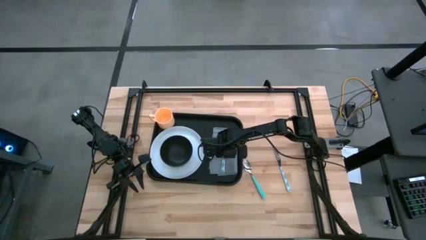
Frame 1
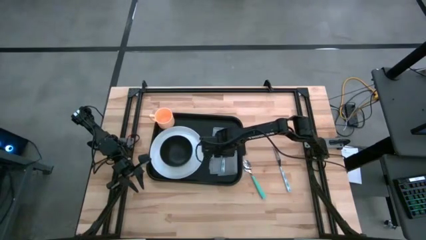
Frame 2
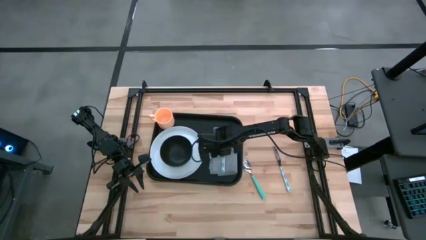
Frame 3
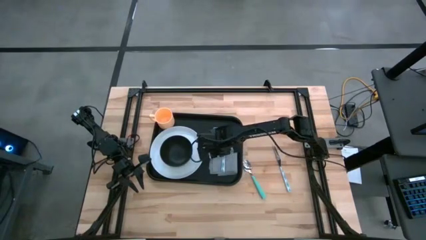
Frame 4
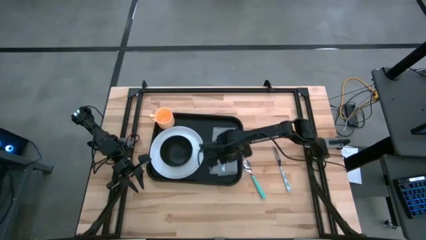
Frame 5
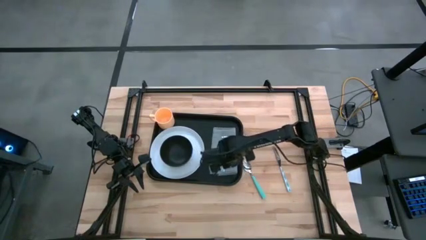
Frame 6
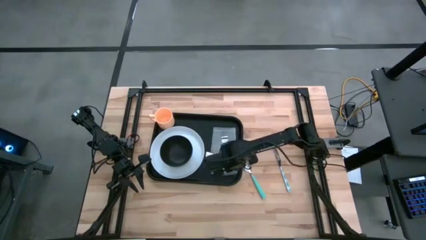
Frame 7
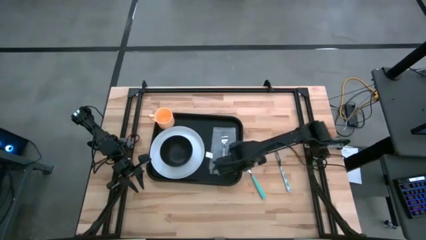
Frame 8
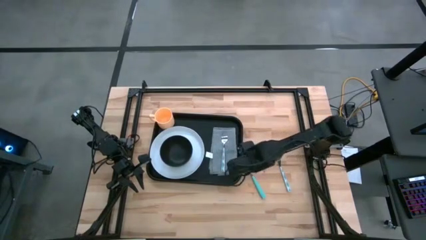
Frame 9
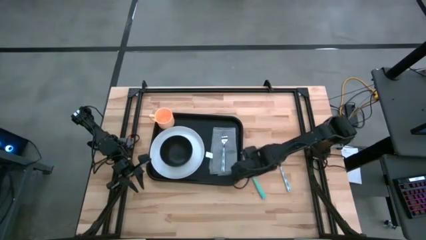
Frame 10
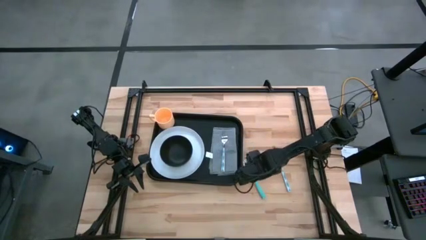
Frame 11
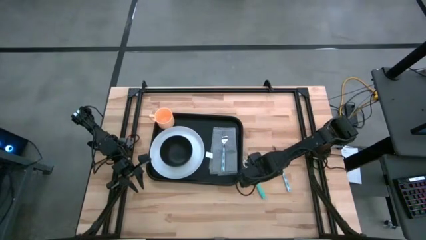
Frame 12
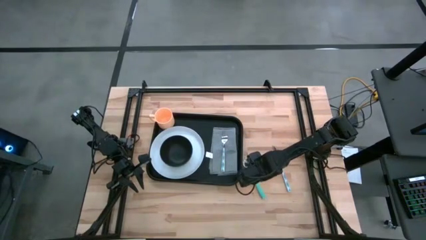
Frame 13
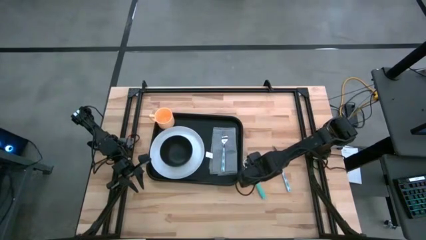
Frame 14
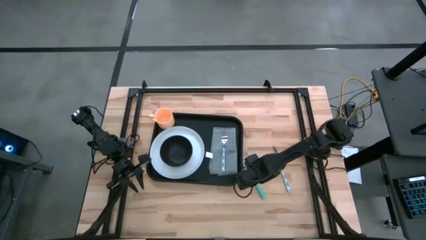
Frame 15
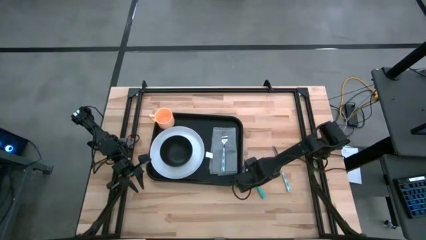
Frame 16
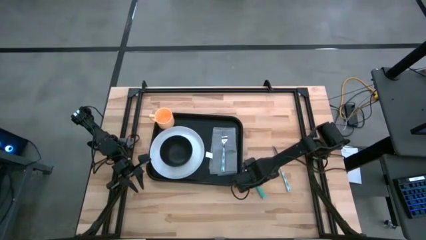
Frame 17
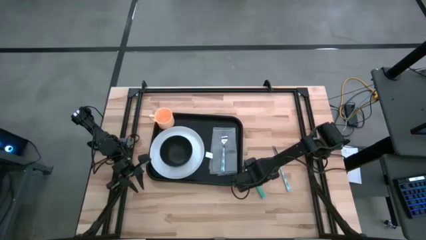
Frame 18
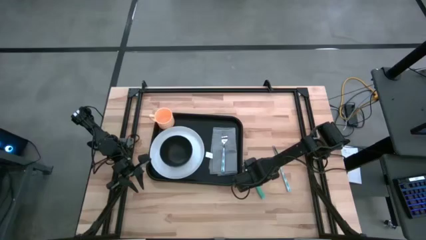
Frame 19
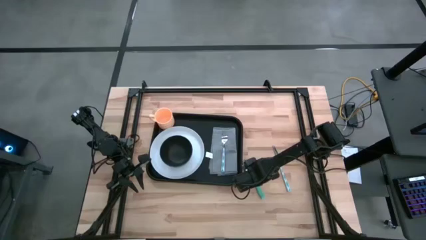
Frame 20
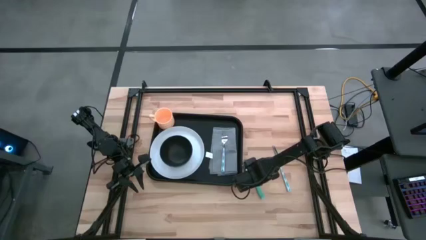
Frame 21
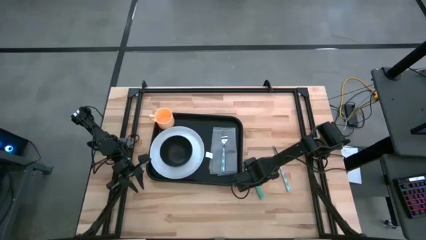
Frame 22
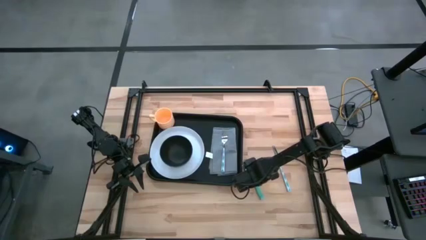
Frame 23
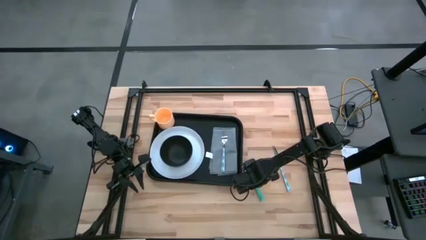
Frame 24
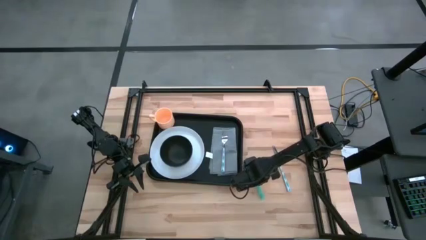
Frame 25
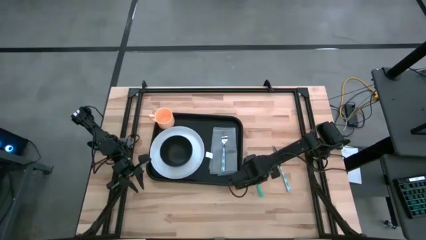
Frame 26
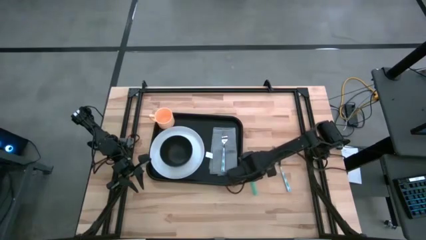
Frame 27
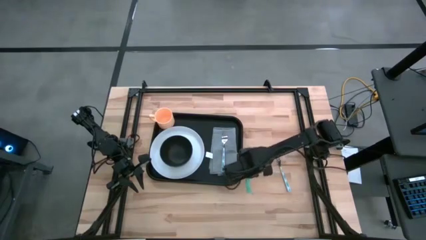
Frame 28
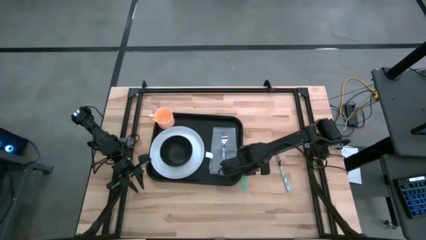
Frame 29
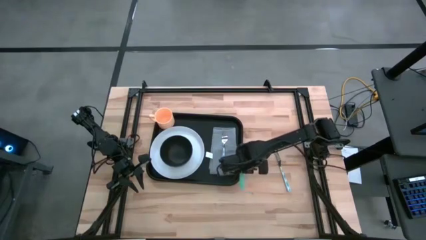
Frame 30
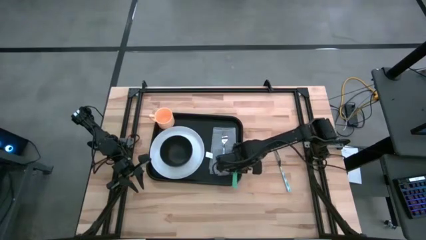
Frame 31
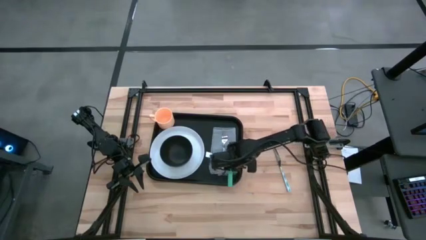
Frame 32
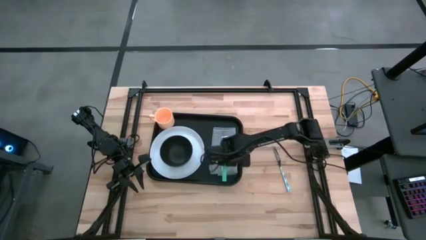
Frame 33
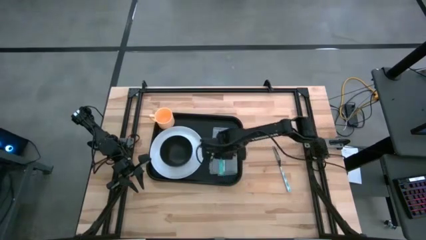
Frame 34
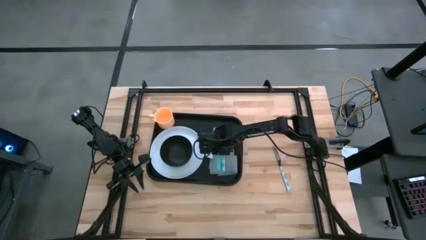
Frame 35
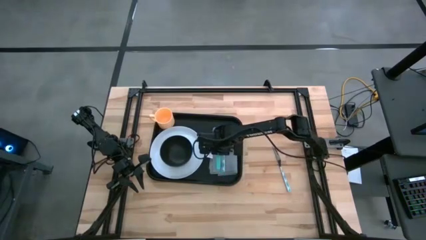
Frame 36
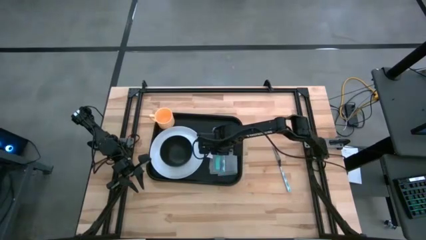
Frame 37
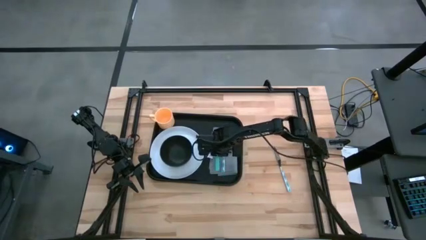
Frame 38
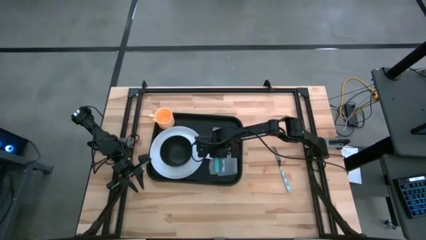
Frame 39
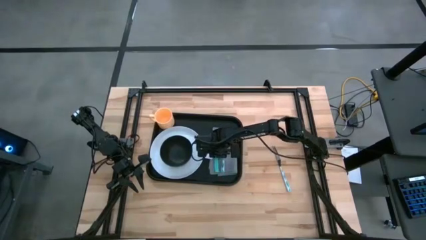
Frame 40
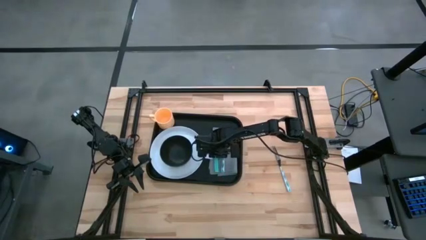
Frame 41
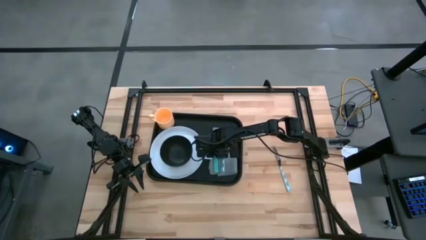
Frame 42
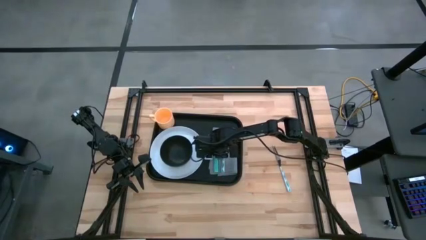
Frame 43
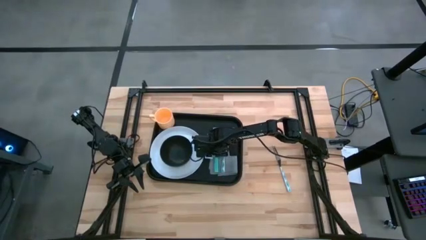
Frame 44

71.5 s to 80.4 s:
Task: Set up tray
Put the blue spoon on top of the gray napkin to the left of the blue fork

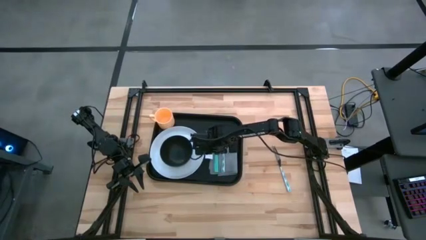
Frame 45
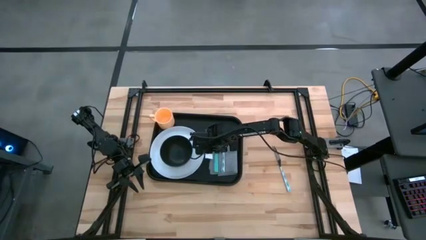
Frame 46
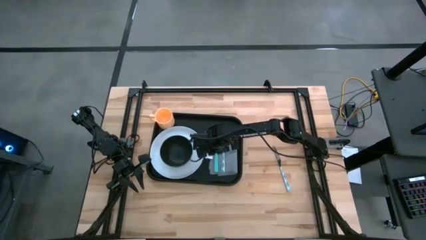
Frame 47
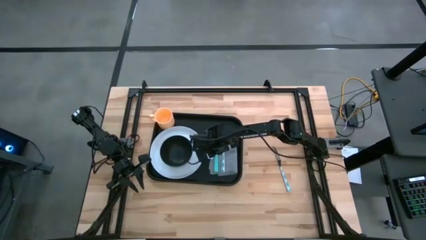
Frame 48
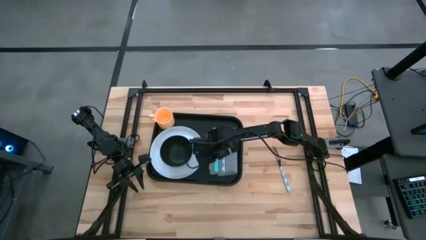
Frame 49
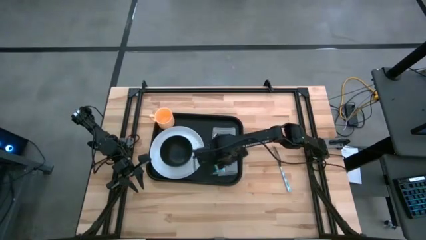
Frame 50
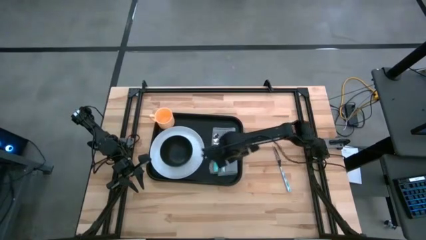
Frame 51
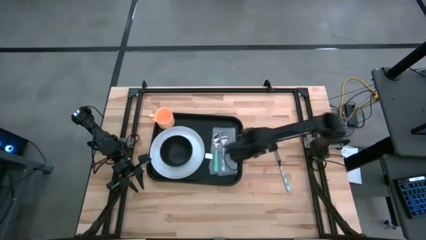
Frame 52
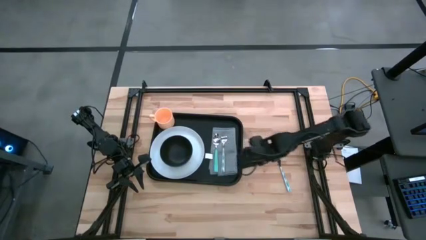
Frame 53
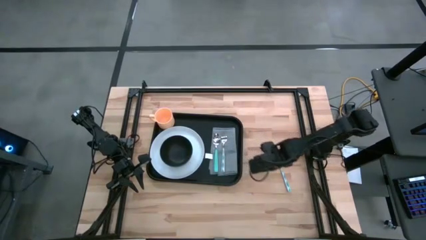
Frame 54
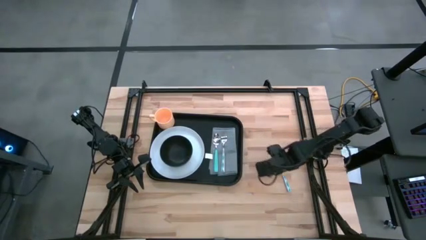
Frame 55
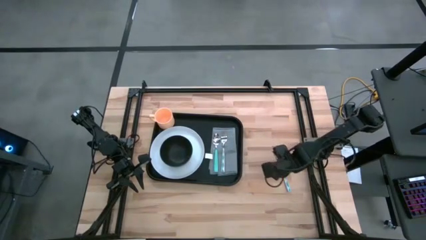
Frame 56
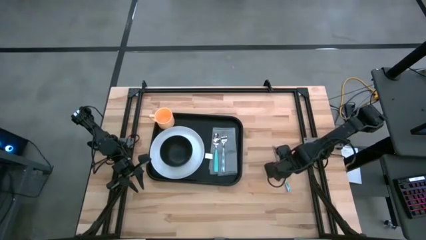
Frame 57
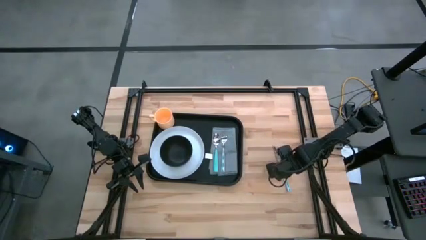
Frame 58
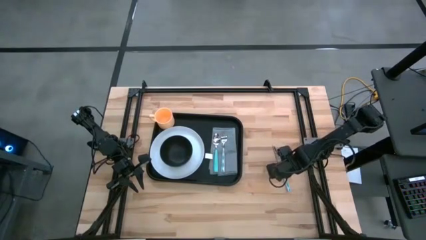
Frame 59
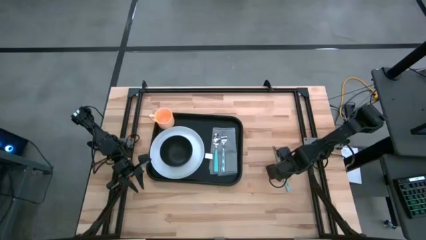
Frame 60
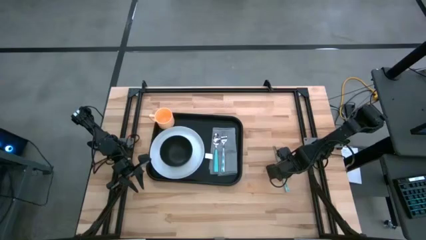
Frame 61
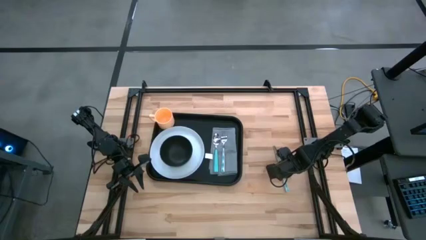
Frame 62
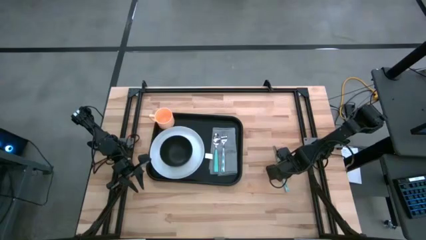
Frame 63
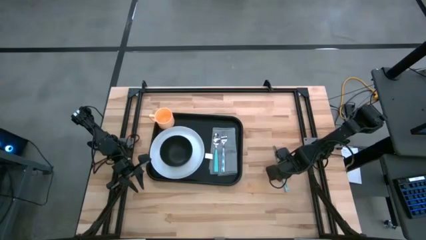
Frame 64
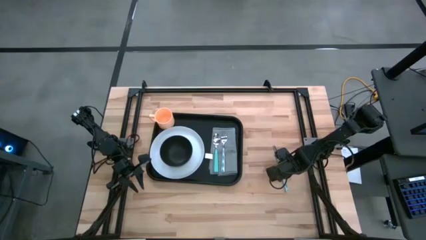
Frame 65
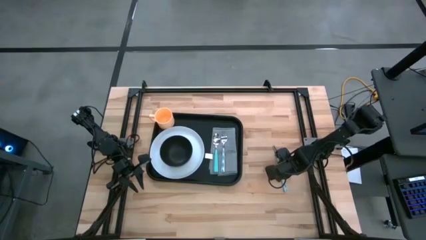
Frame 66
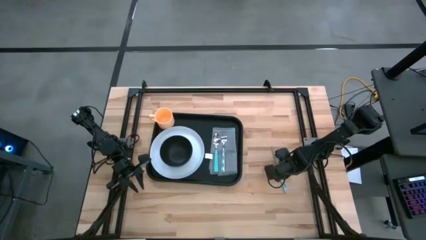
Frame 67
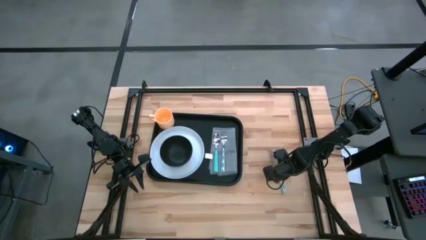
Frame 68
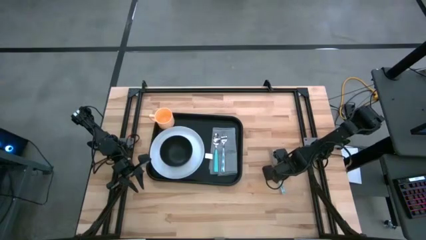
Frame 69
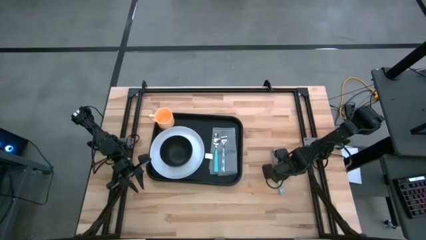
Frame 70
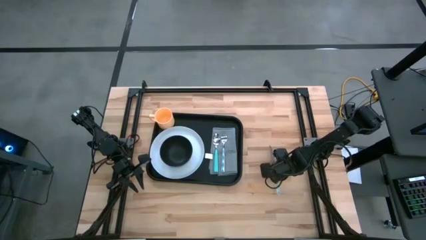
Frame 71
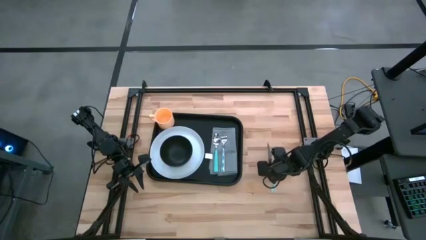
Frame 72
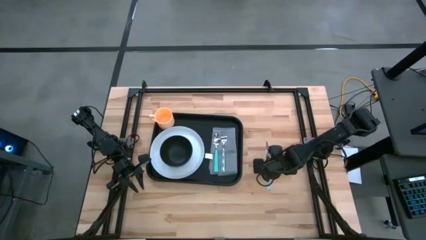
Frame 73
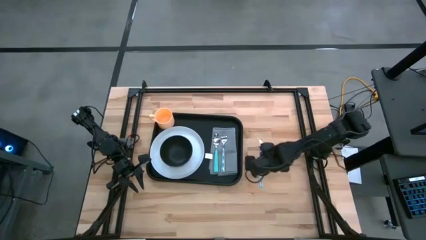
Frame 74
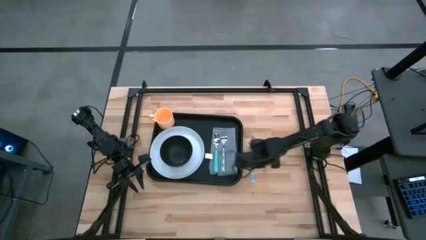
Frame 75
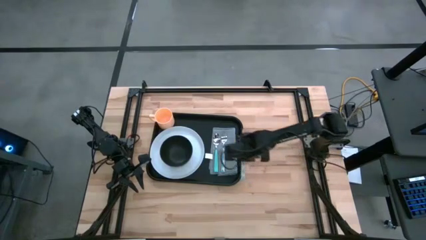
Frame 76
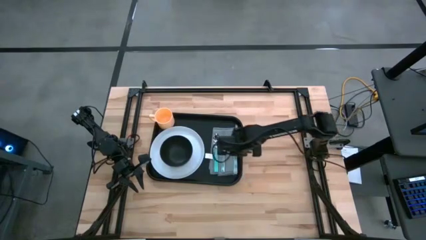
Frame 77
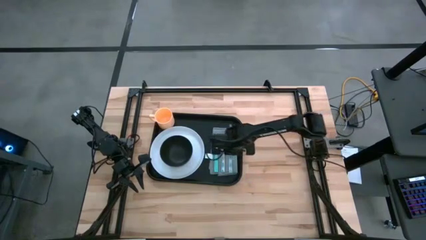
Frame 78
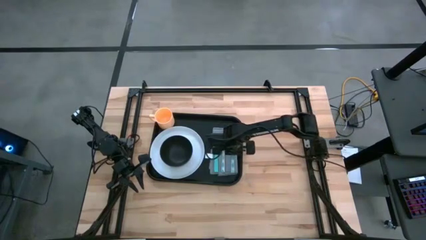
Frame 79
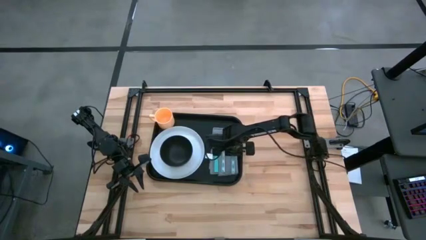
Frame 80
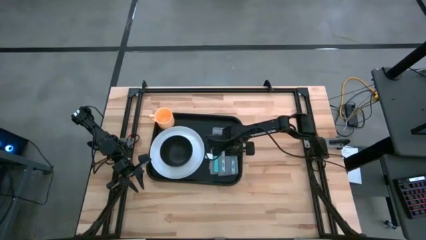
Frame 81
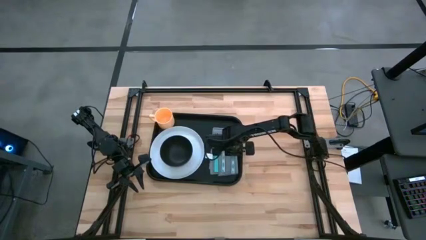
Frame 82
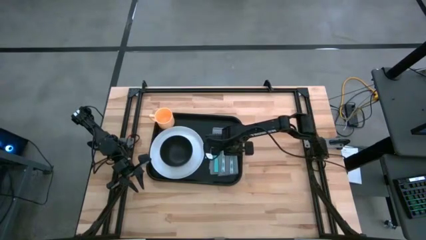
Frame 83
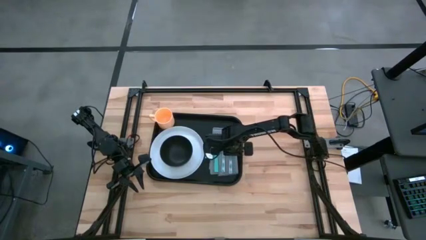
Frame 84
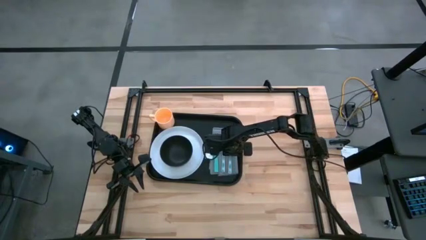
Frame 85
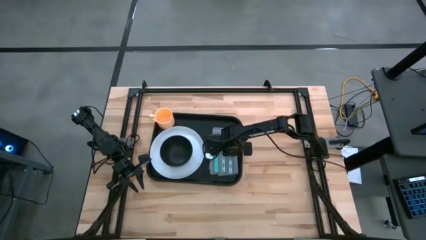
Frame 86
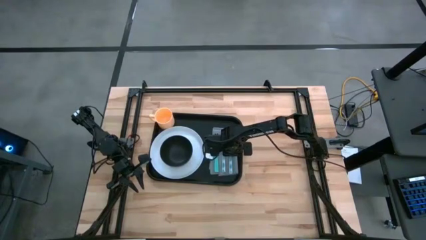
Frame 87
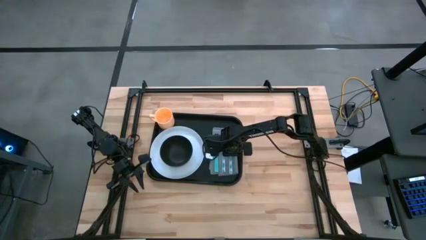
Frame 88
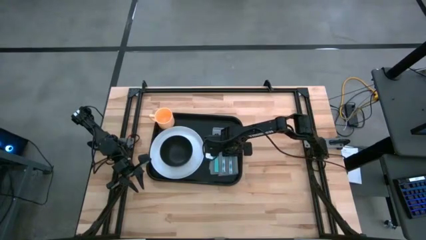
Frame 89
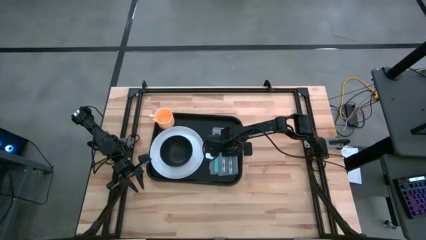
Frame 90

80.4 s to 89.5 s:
Put the blue knife on top of the gray napkin to the right of the blue fork
